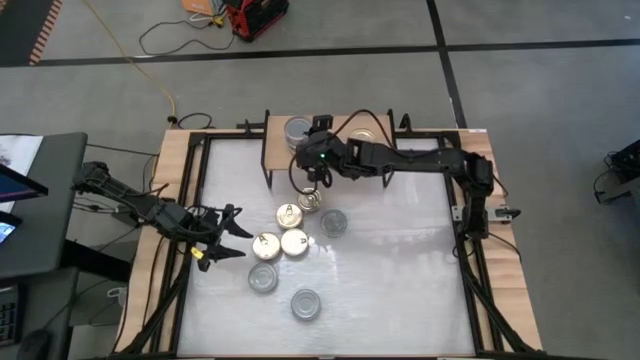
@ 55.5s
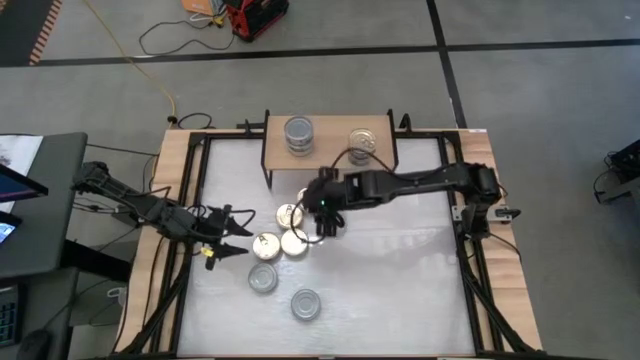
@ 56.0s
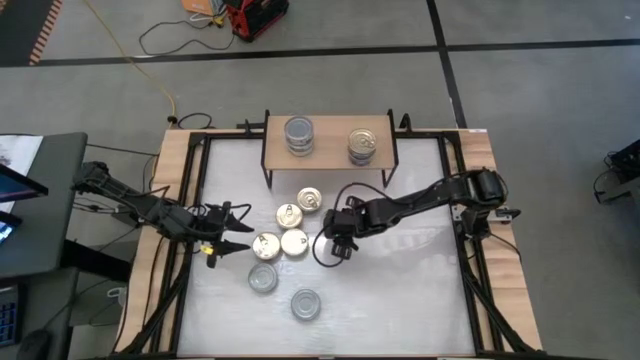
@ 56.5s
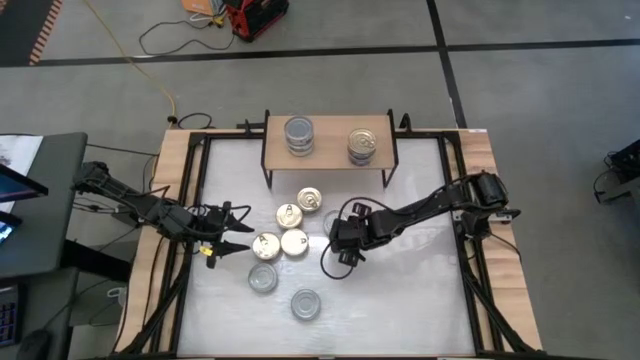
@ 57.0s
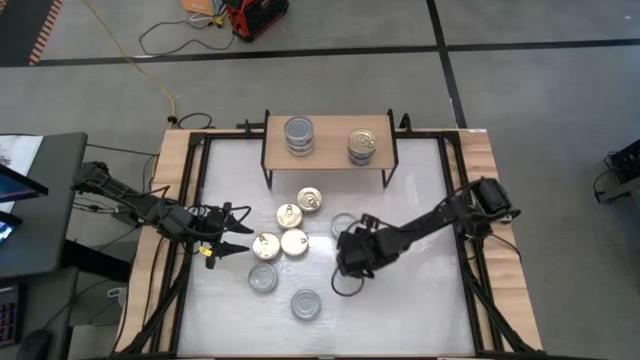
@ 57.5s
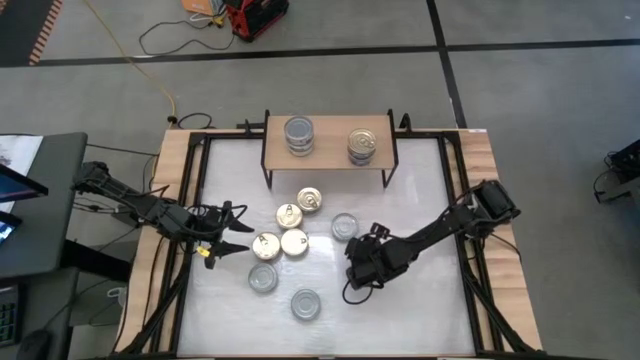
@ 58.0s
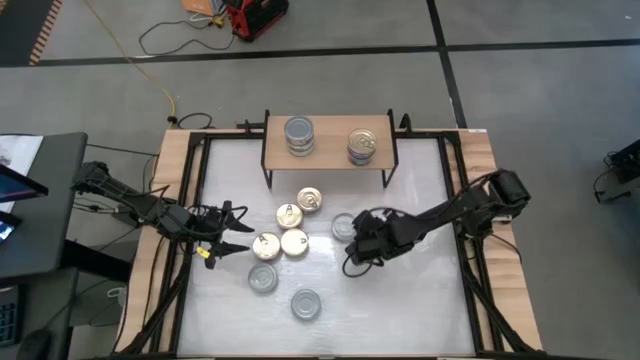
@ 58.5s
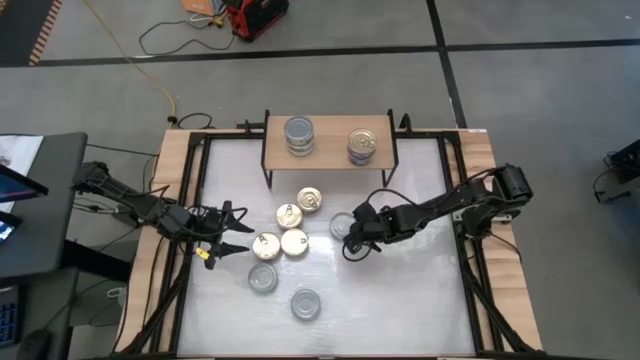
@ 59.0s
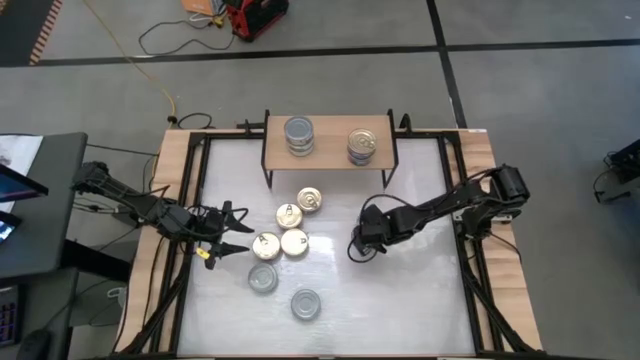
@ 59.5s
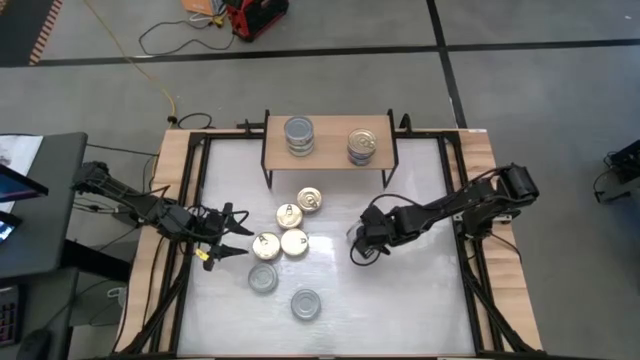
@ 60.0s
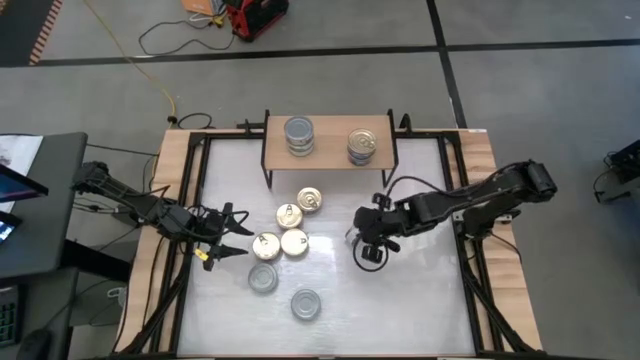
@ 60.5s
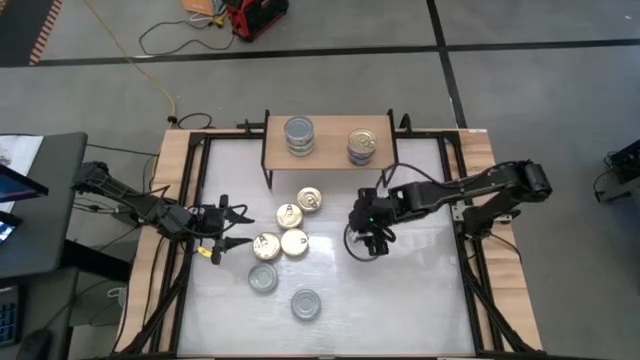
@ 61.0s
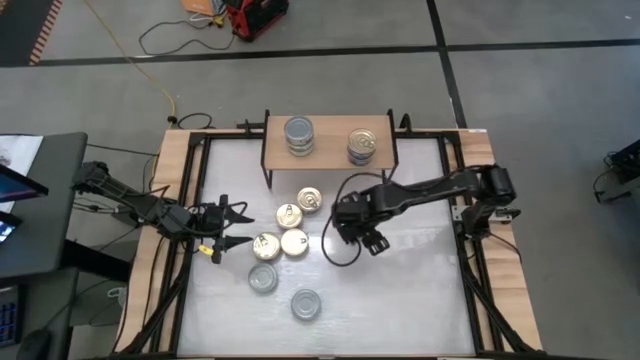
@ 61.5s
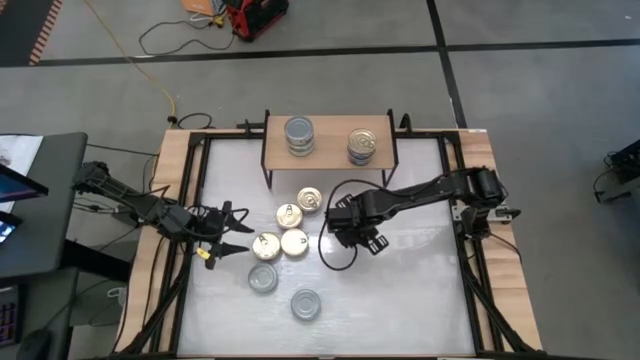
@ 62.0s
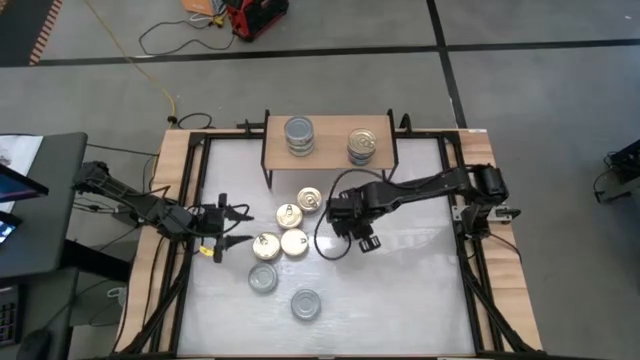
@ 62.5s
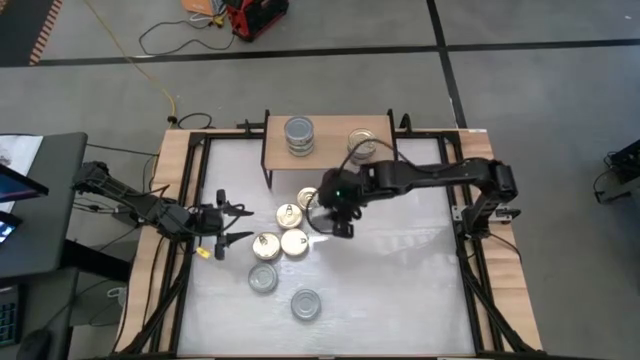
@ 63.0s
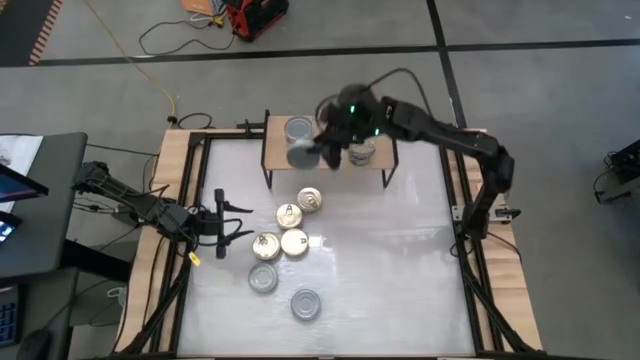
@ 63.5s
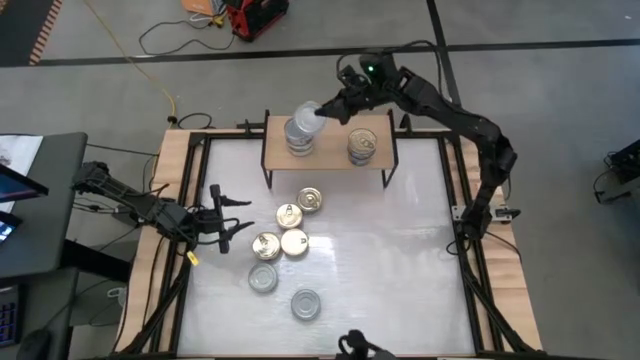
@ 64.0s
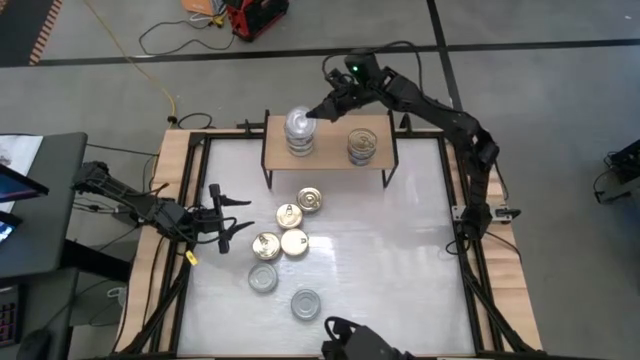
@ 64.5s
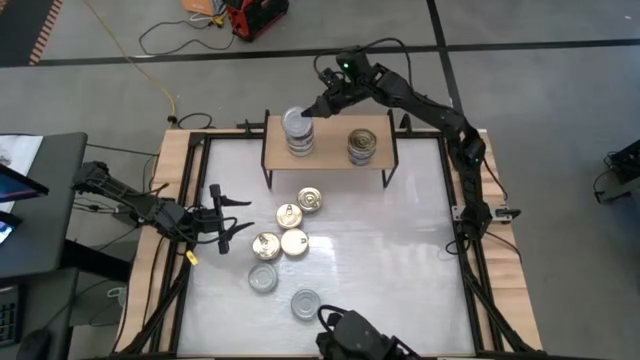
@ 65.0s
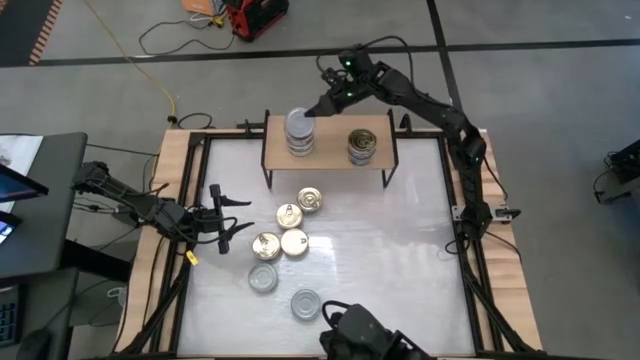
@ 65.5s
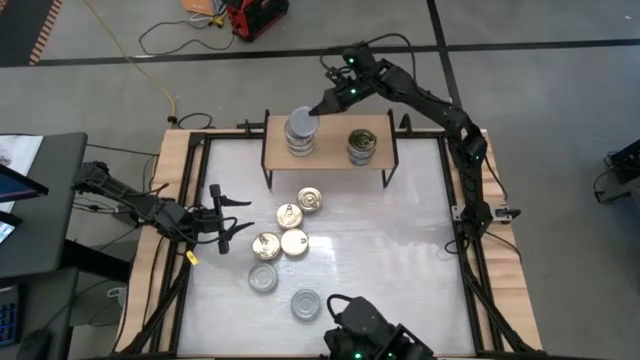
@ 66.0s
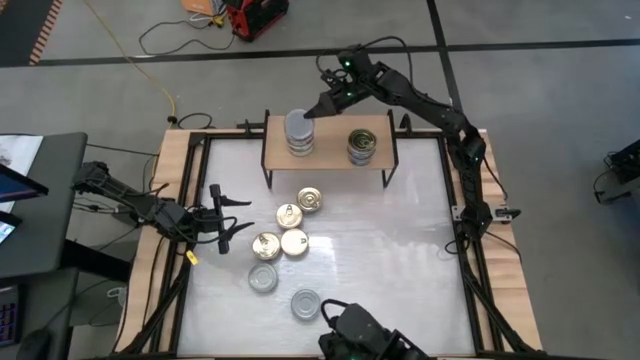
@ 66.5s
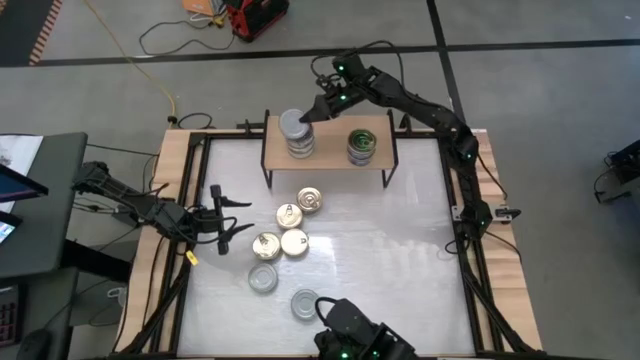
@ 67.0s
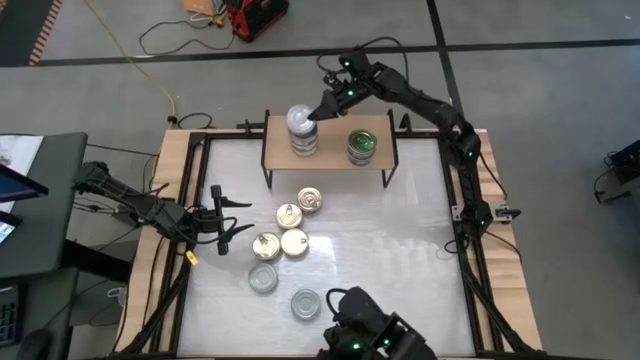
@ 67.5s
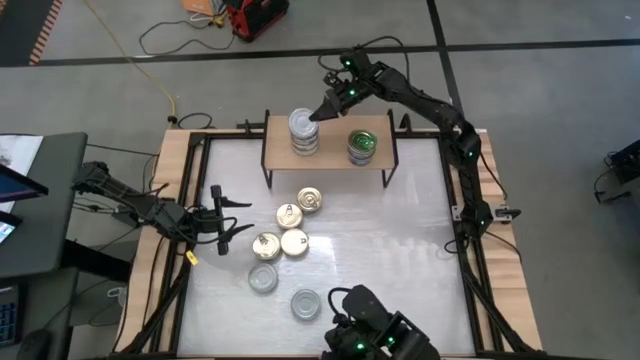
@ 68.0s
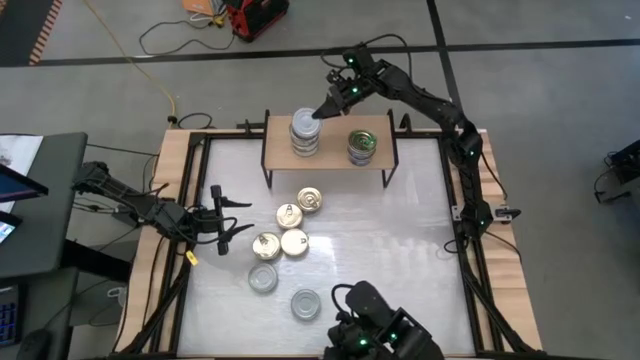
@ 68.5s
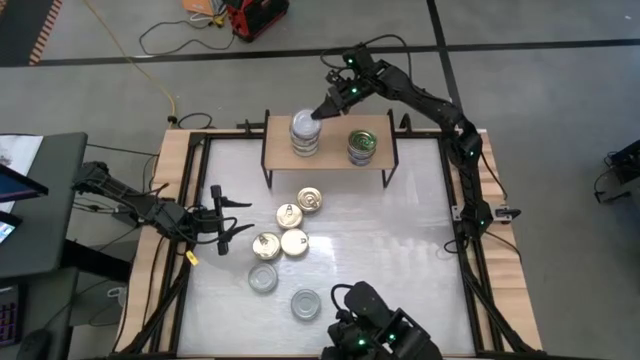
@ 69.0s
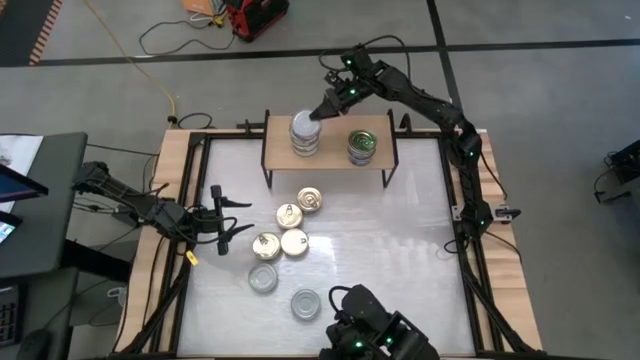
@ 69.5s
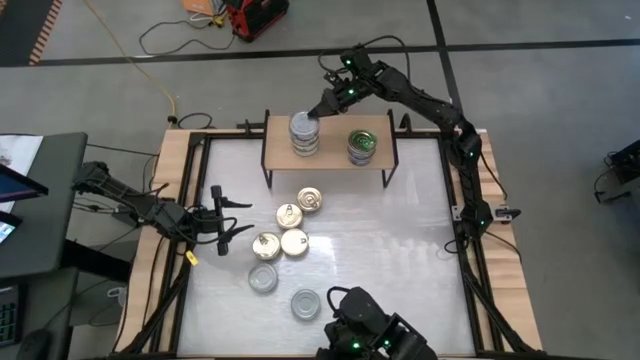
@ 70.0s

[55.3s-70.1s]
Task: Stack canned seafood by type on shelf
Stack the green white tuna can on top of the other green white tuna cans on the shelf

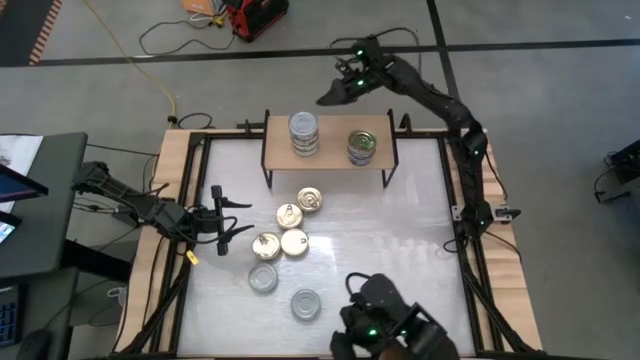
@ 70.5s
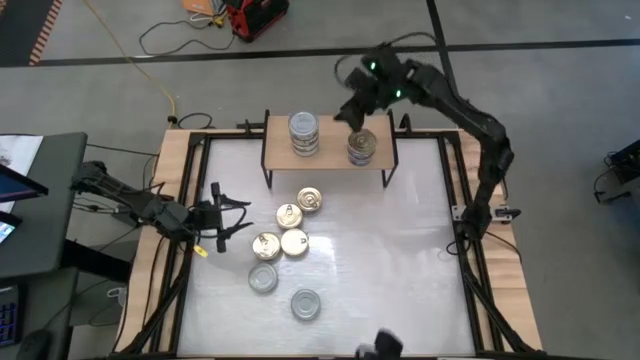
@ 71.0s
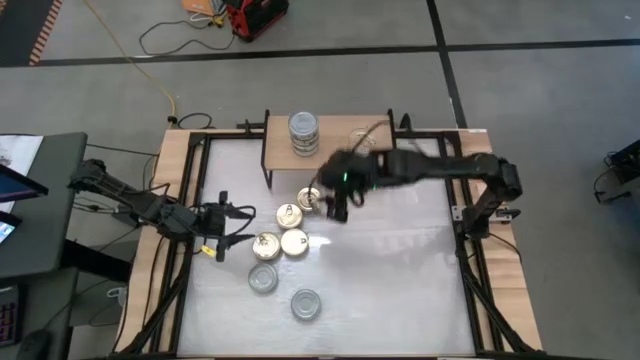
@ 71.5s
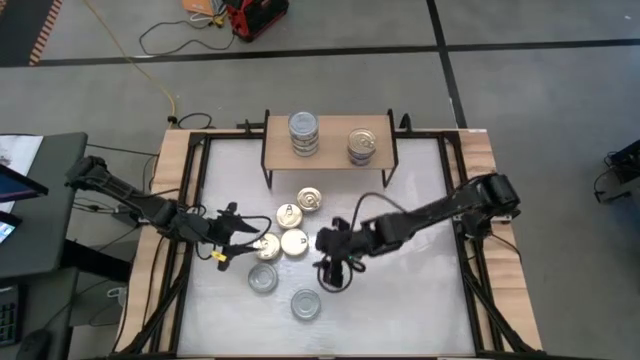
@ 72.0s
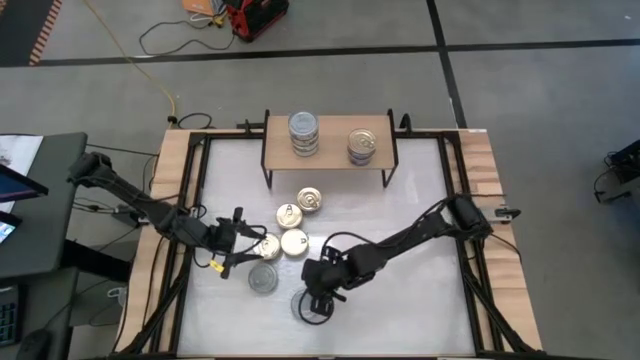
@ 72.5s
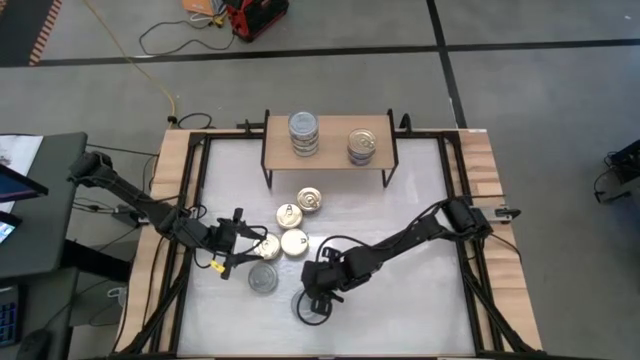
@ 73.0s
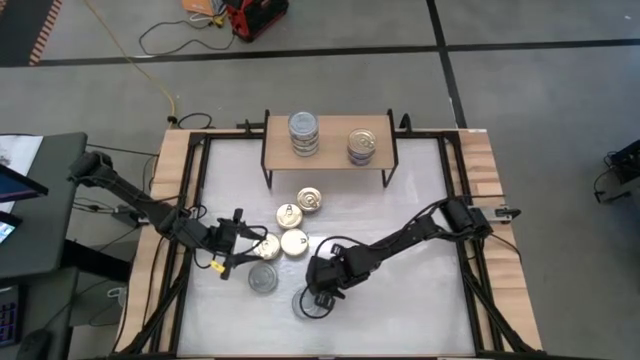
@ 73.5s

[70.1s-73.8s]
Stack the green white tuna can on top of the other green white tuna cans on the shelf

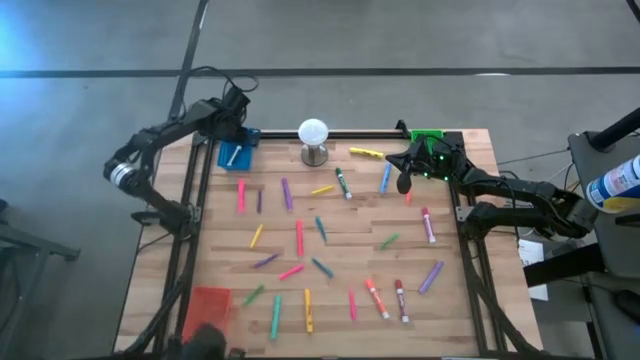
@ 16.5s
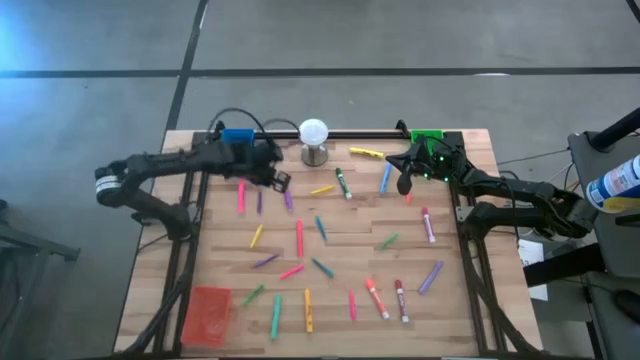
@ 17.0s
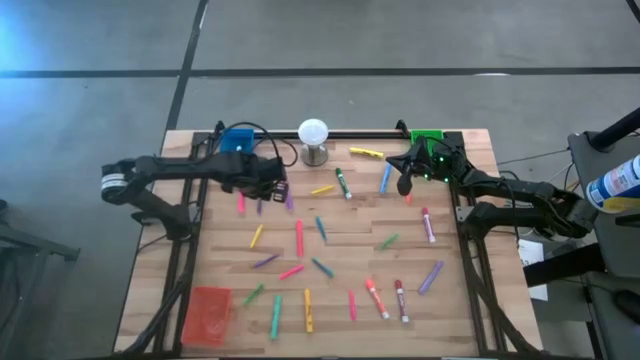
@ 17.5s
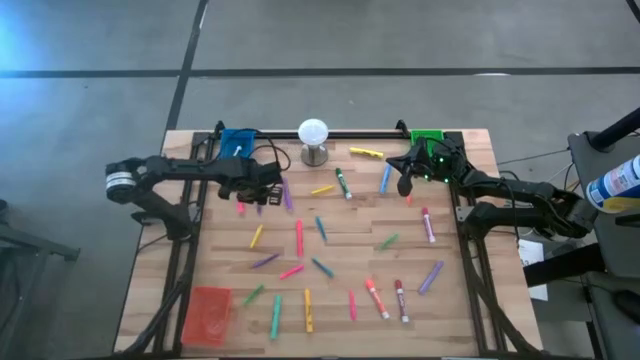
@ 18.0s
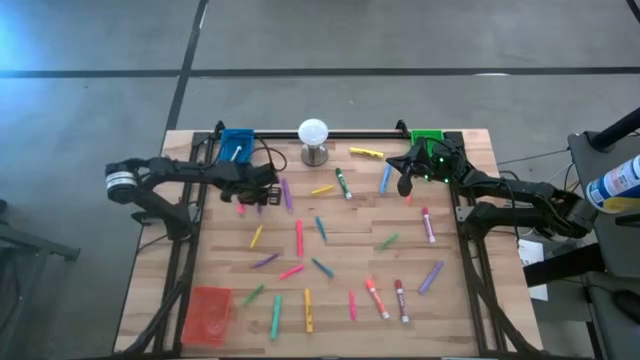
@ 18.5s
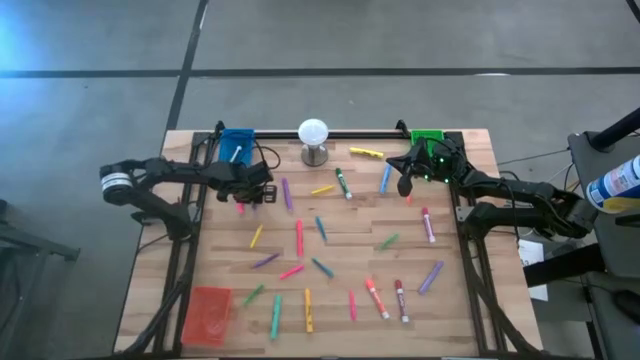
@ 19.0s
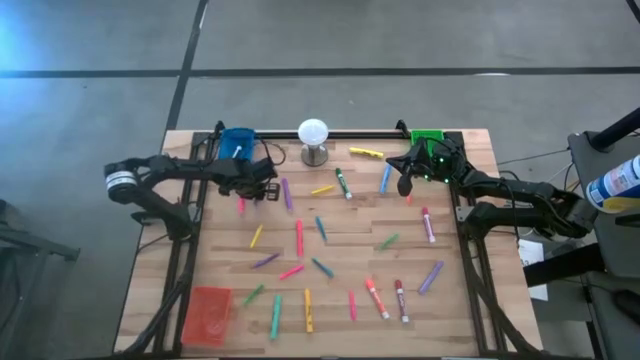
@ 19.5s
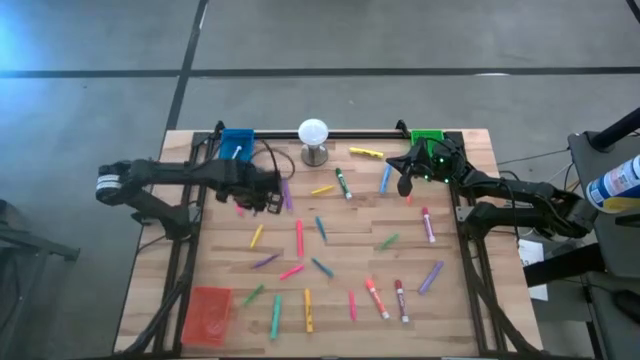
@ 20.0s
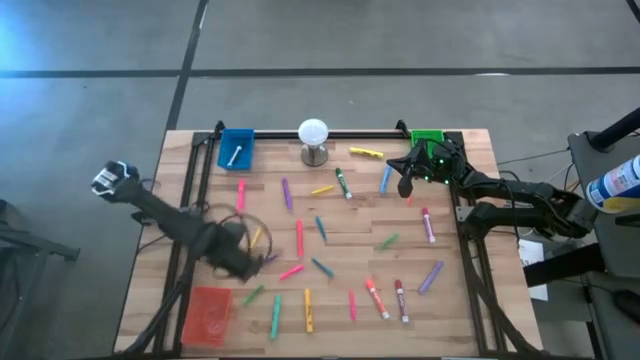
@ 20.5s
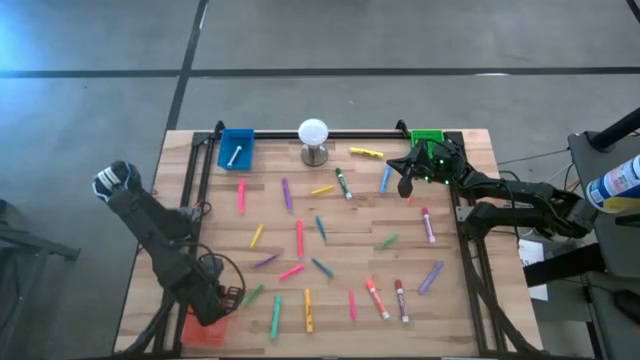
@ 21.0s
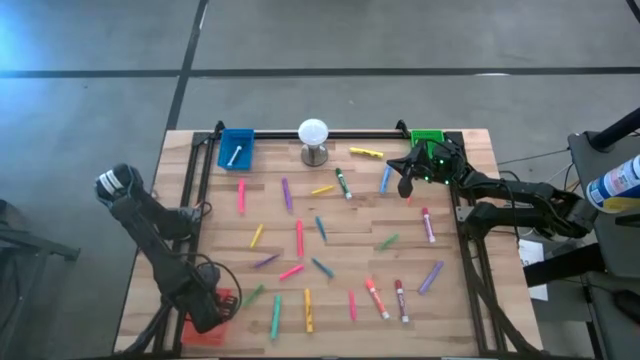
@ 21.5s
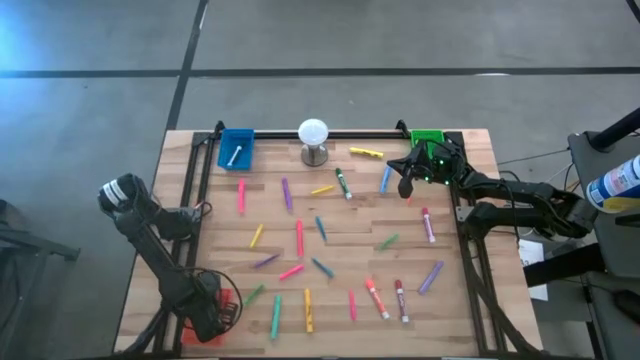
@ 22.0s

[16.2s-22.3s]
Task: Pick & Place Markers
Put the top violet pen into the orange bin
